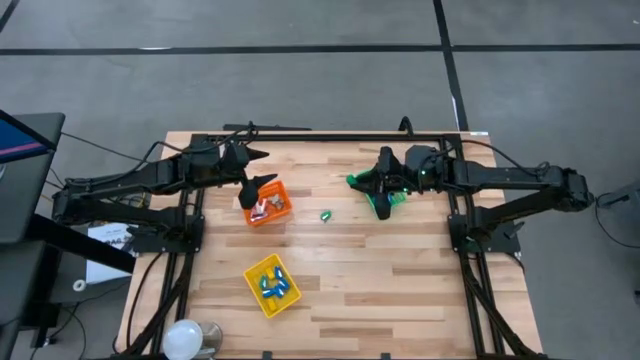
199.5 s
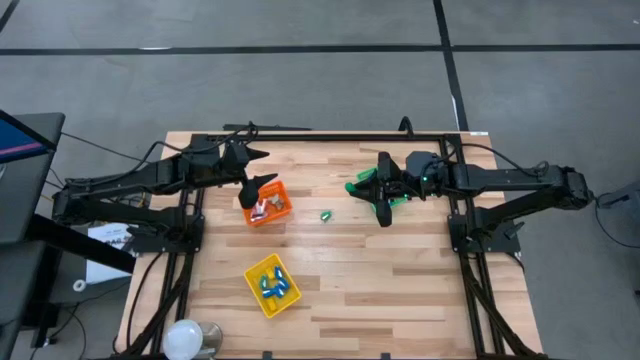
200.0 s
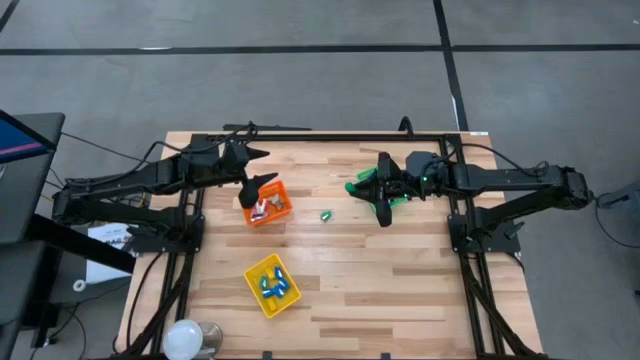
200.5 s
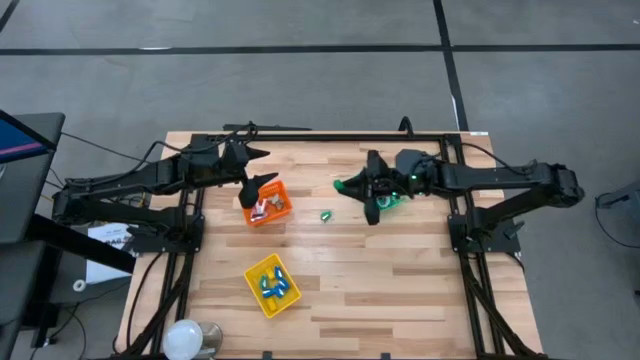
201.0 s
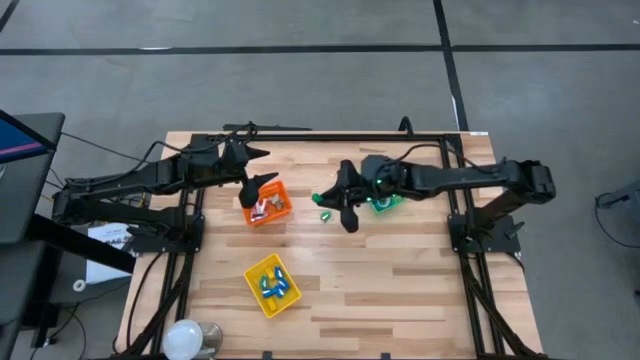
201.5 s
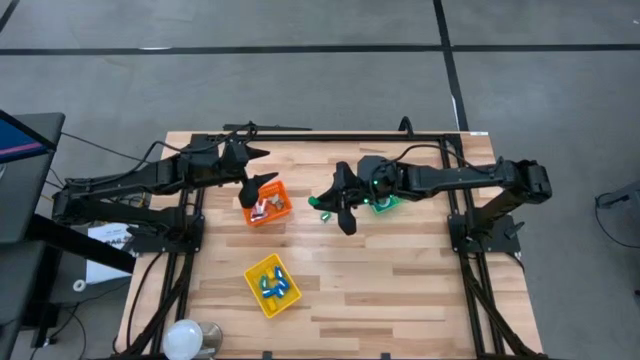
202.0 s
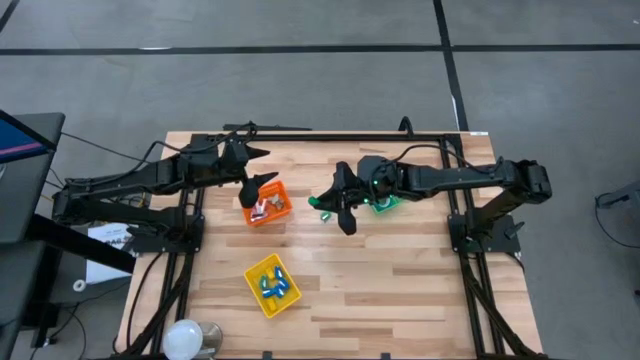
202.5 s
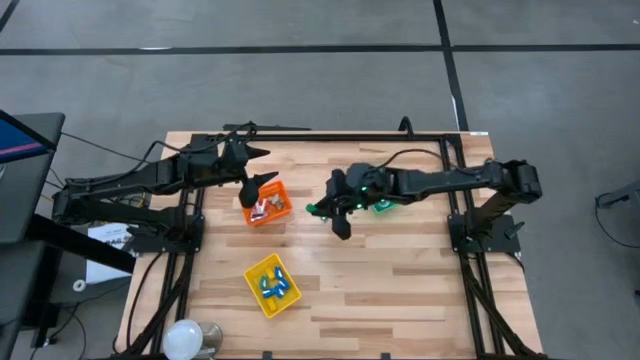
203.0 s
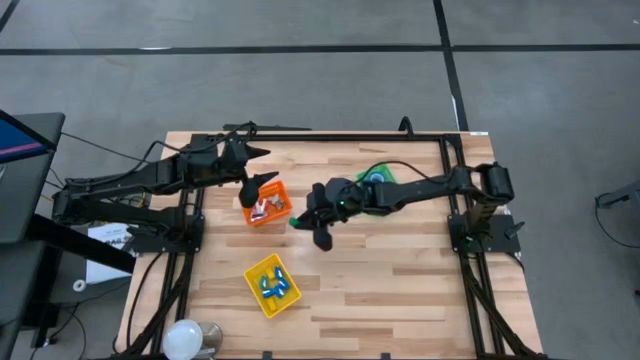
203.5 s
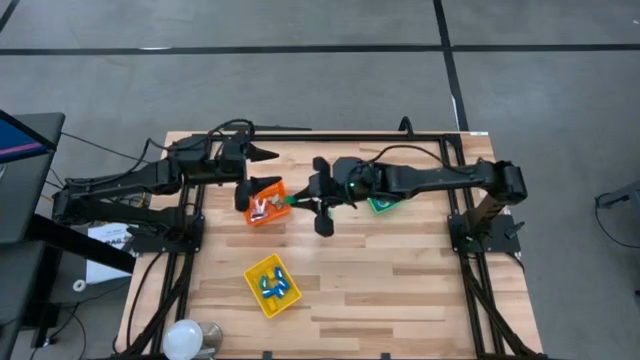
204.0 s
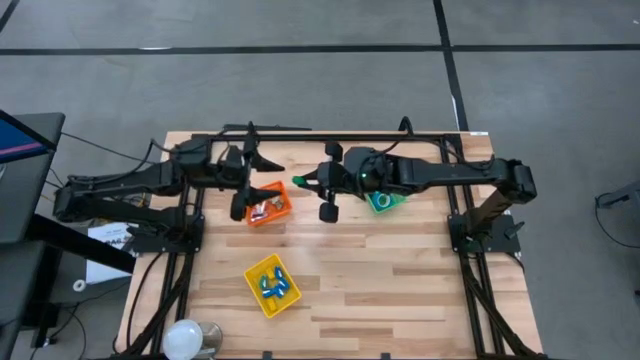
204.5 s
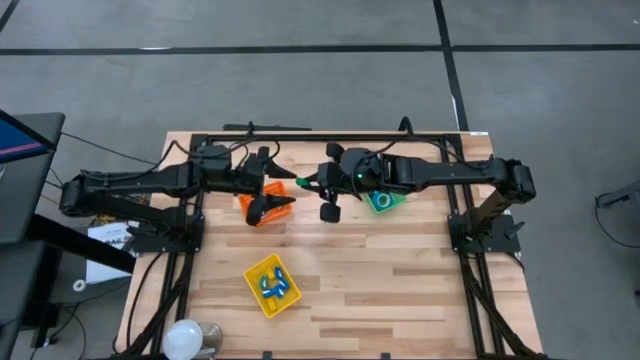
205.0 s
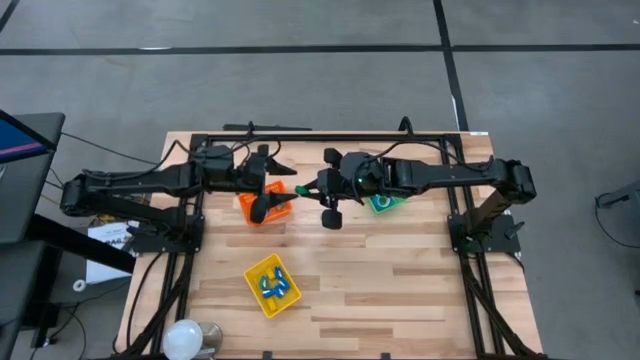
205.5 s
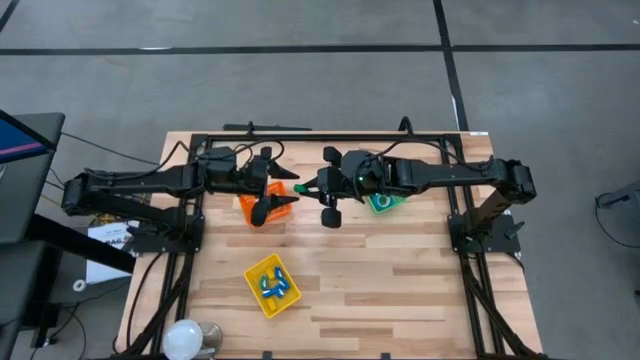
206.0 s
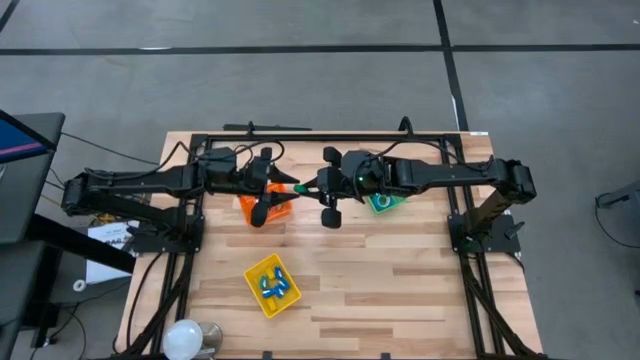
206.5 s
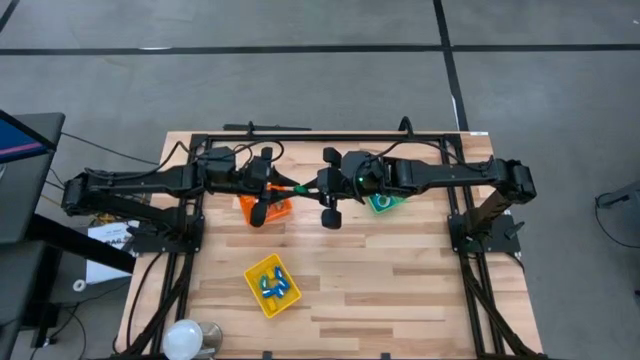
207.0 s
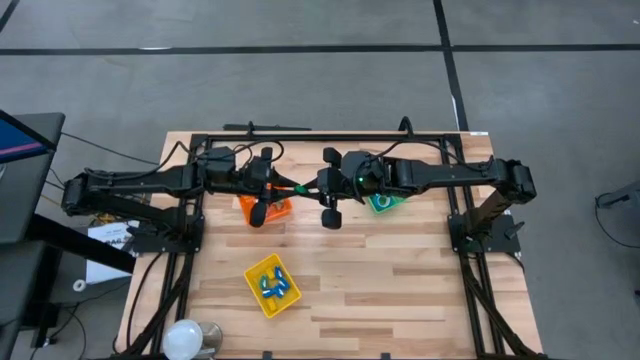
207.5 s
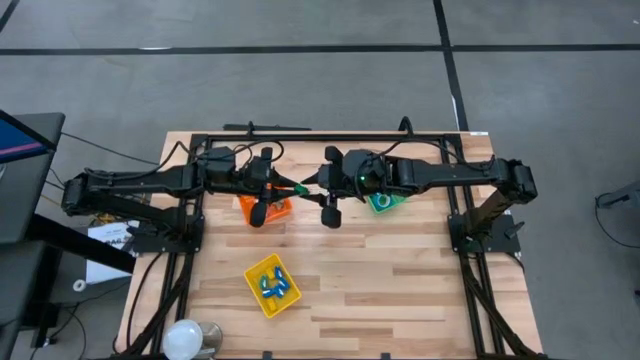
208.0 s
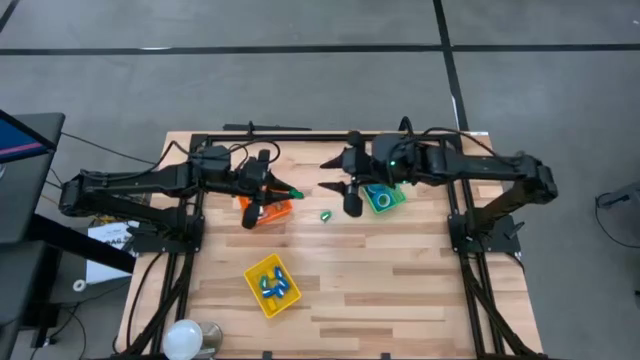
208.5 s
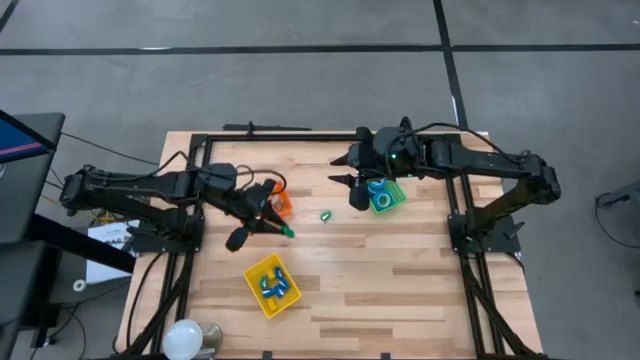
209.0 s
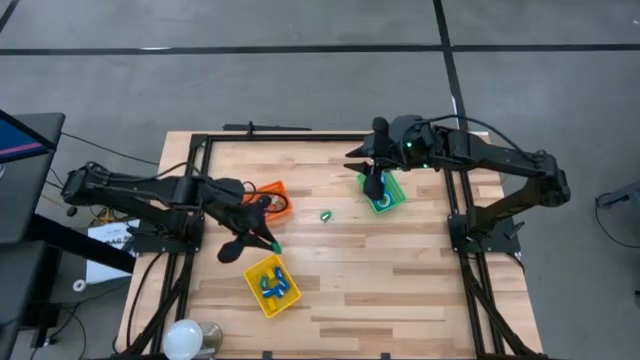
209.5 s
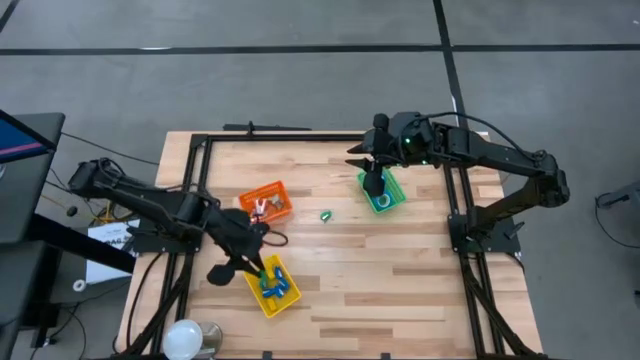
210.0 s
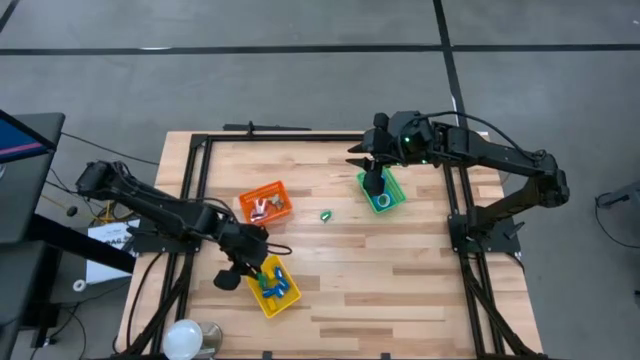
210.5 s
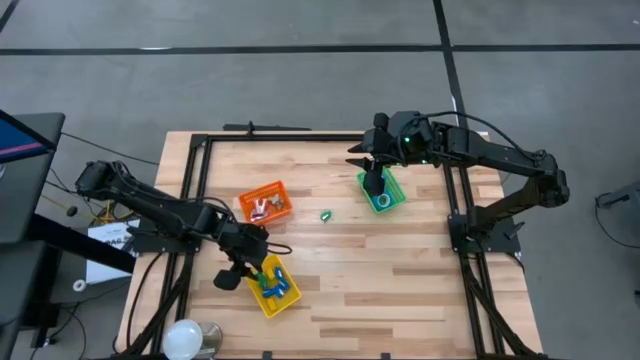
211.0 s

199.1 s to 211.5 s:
Task: Pick and place Stapler, Stapler remover, tape
Put the green stapler into the yellow basket

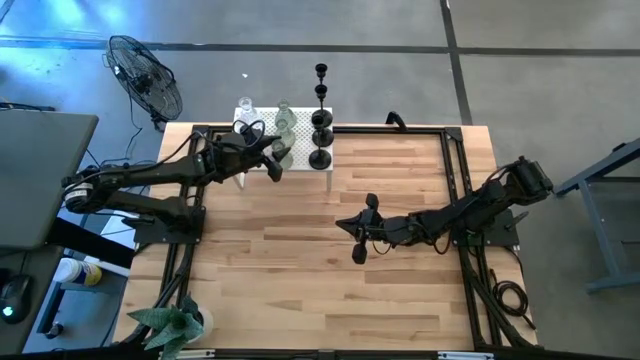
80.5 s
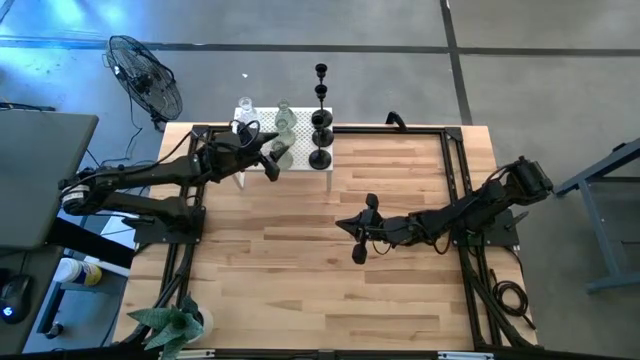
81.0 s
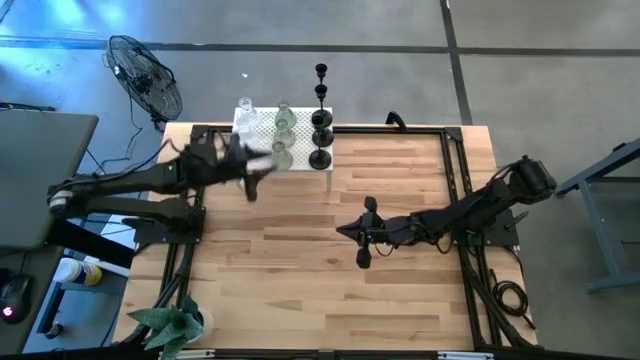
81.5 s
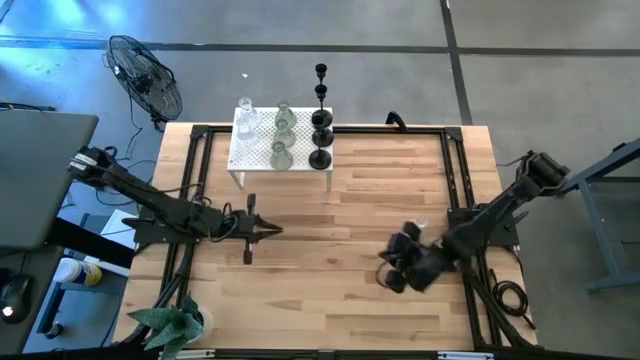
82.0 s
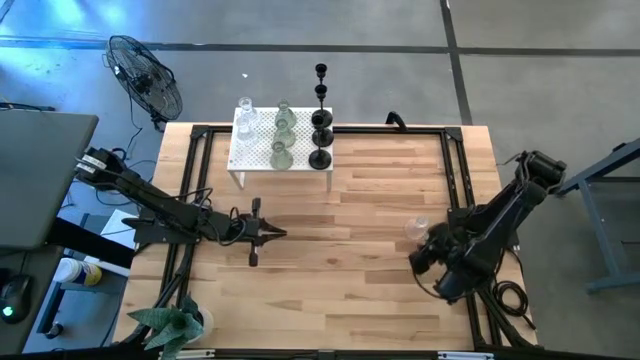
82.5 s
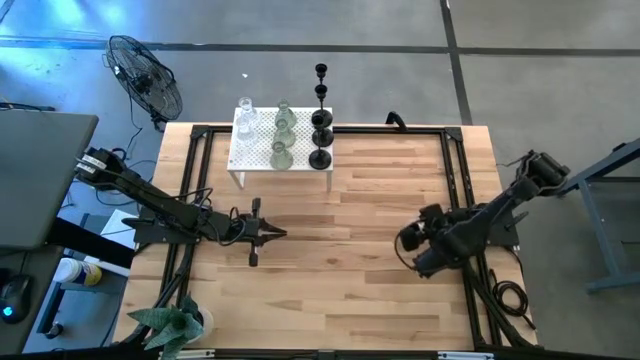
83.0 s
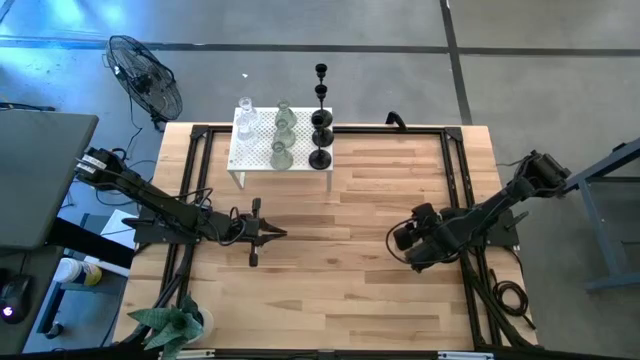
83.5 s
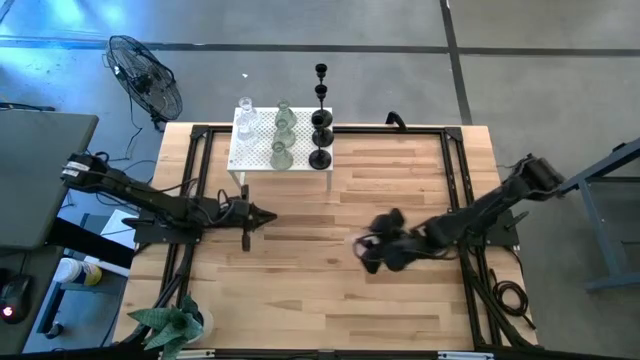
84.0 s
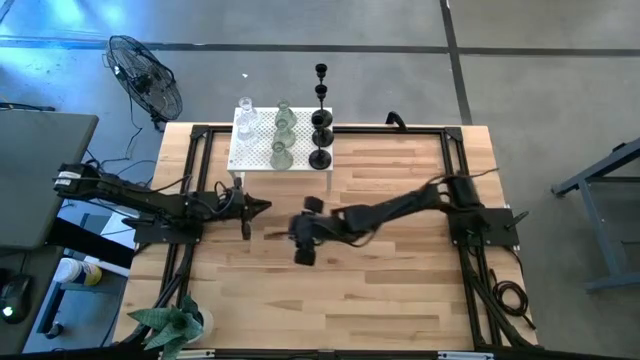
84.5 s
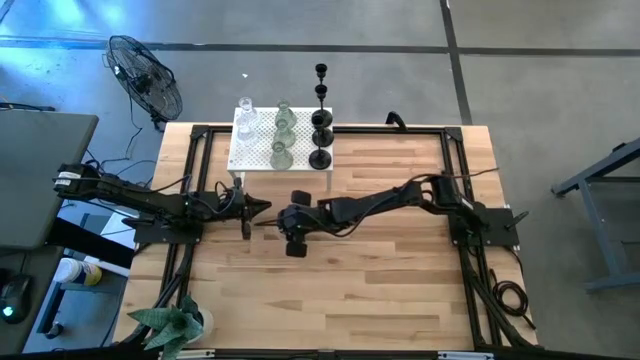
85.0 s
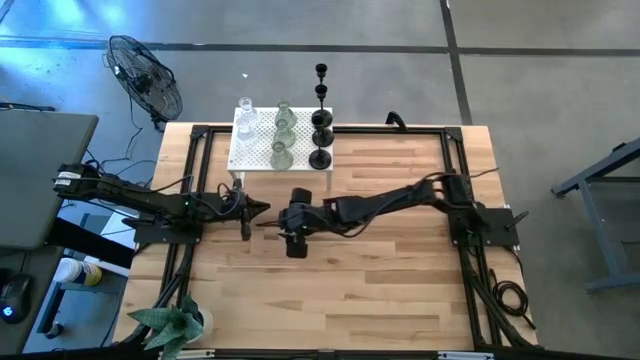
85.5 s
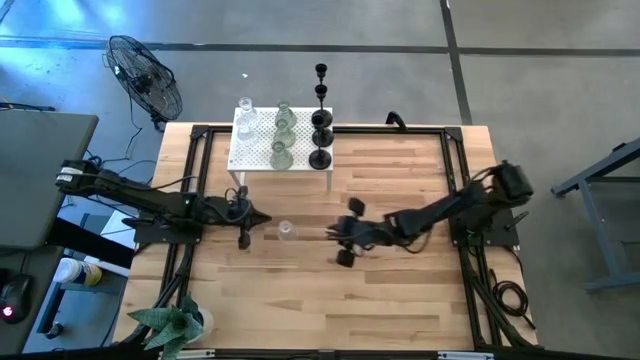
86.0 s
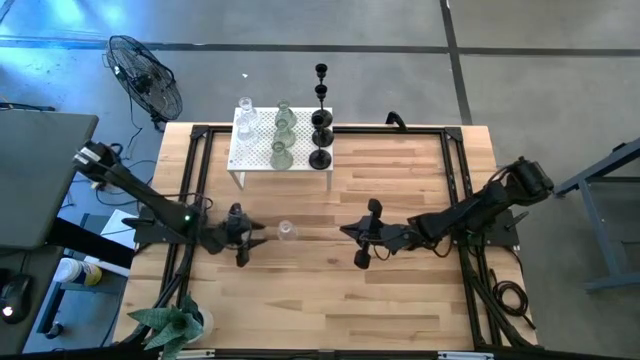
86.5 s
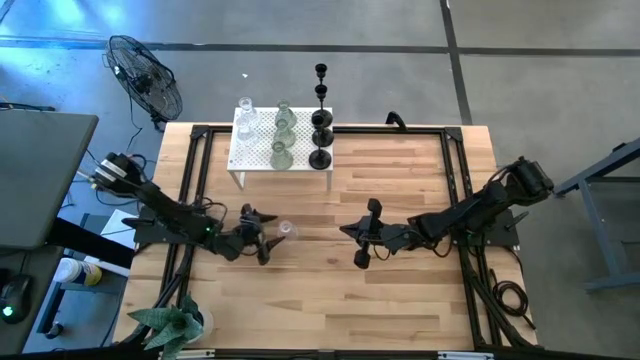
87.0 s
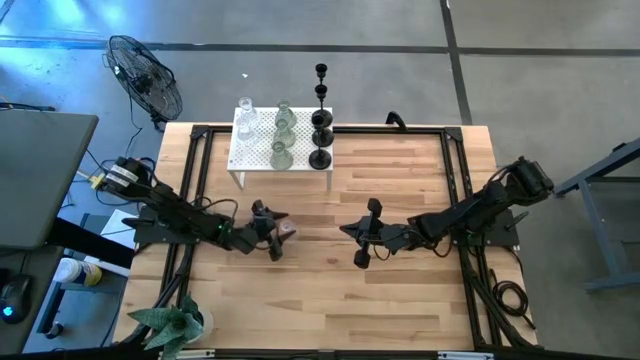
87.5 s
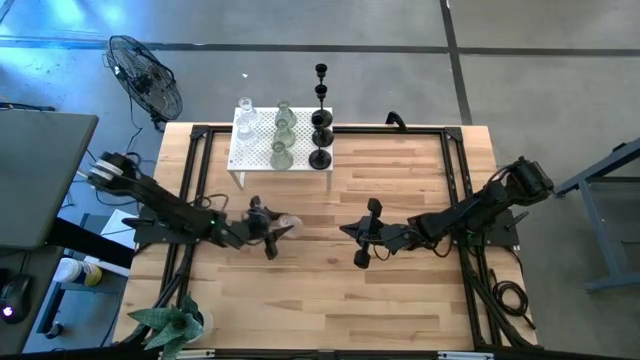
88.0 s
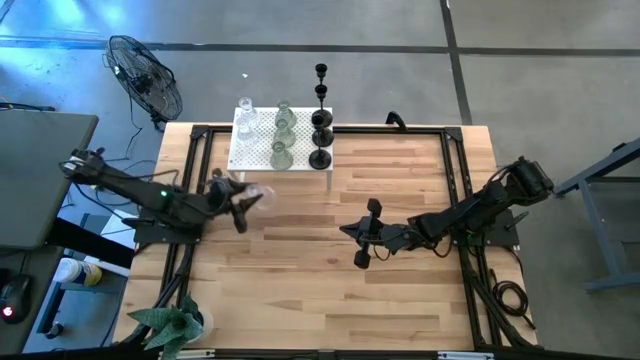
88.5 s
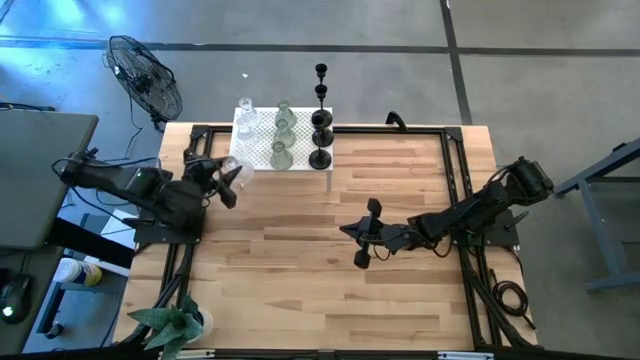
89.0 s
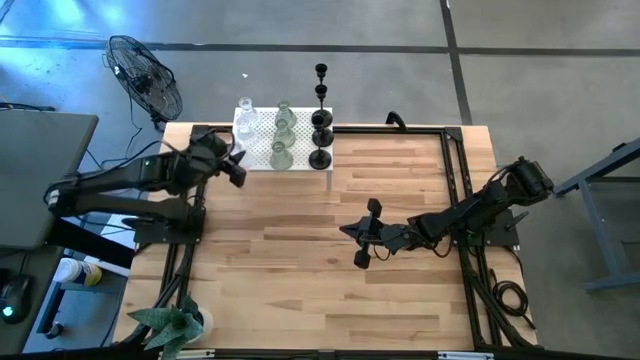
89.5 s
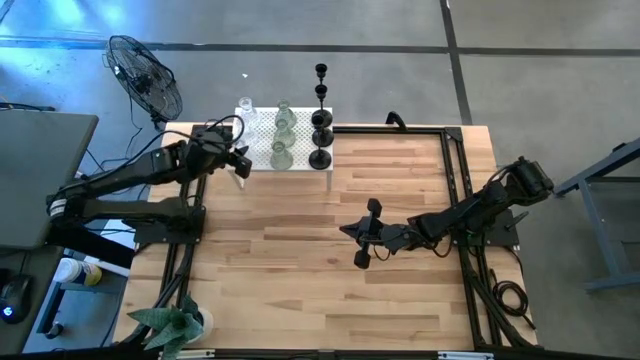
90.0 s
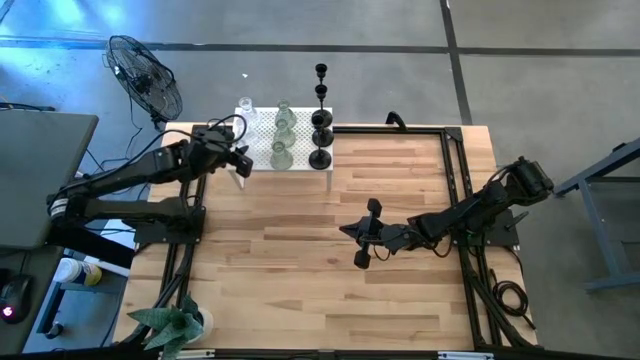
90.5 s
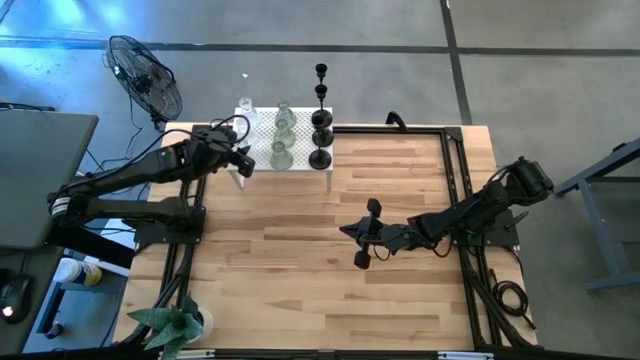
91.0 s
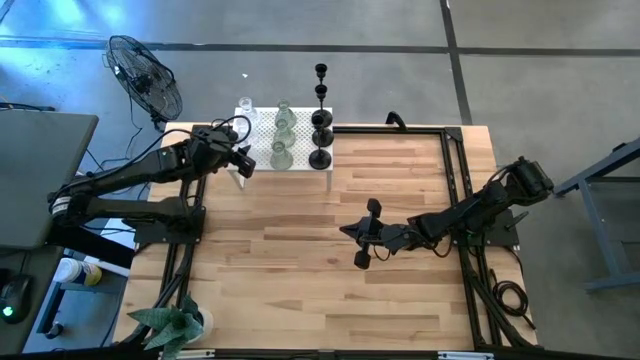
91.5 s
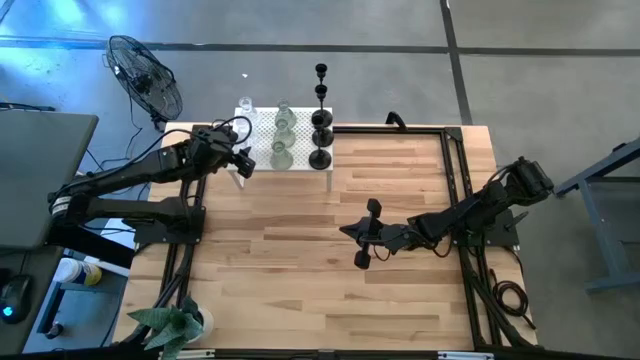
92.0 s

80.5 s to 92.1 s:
Task: Pick & Place candle stick holders
Align the transparent candle holder with the other transparent candle holders on the shelf
